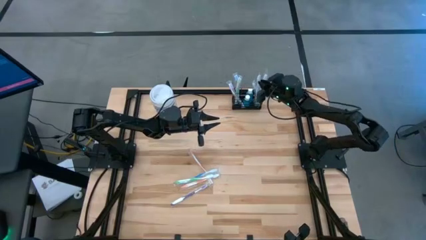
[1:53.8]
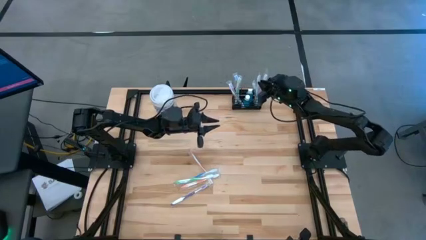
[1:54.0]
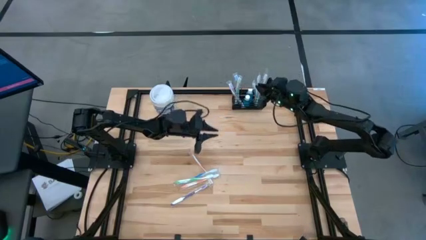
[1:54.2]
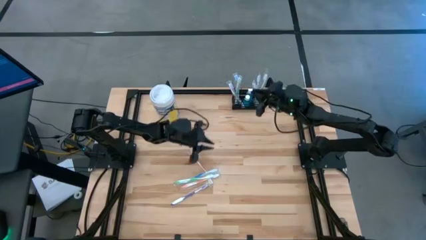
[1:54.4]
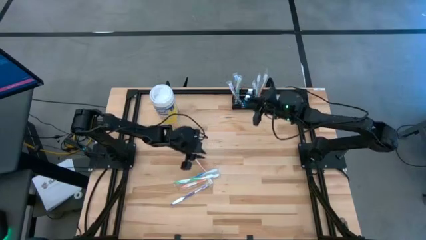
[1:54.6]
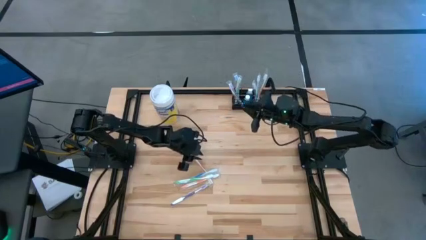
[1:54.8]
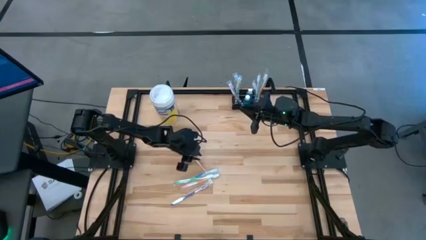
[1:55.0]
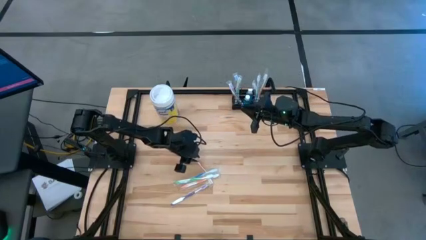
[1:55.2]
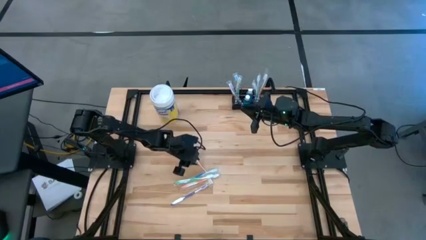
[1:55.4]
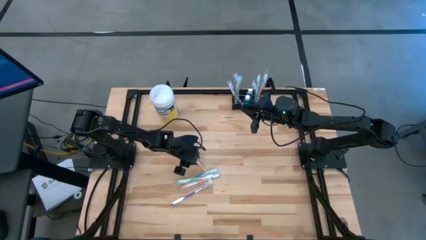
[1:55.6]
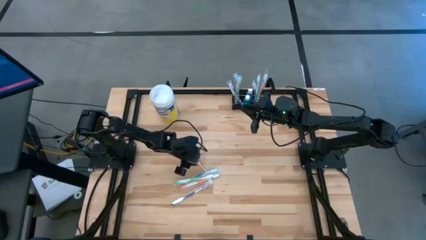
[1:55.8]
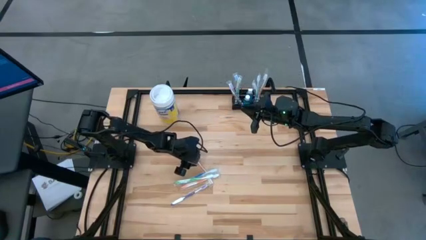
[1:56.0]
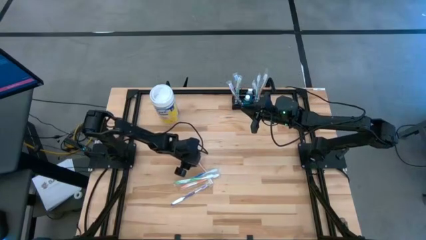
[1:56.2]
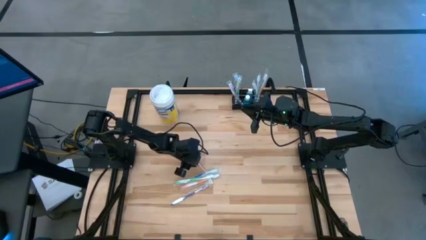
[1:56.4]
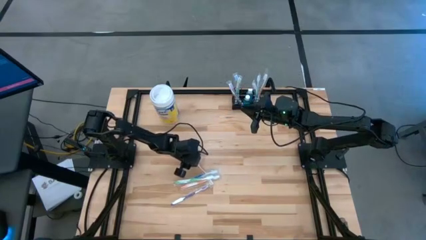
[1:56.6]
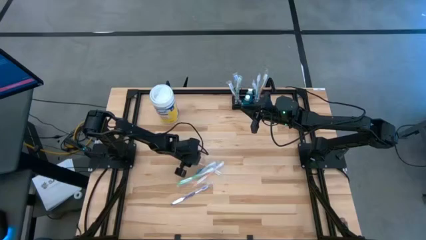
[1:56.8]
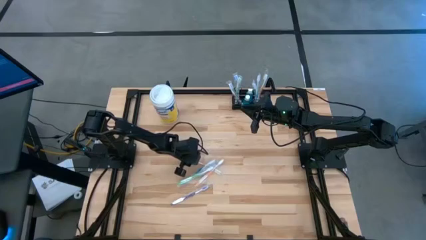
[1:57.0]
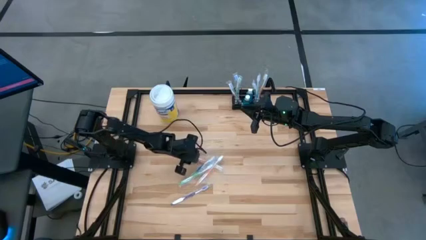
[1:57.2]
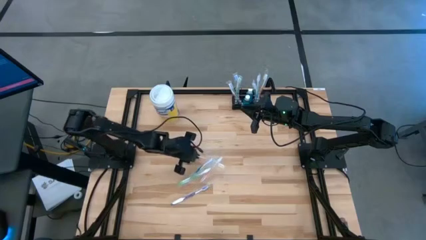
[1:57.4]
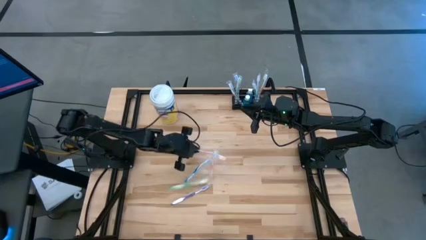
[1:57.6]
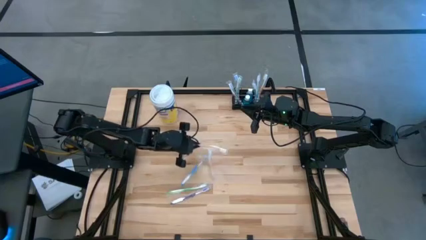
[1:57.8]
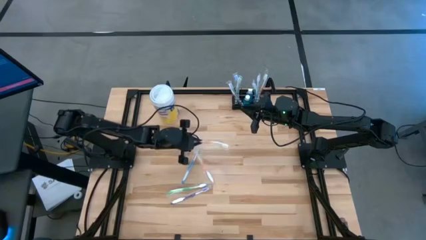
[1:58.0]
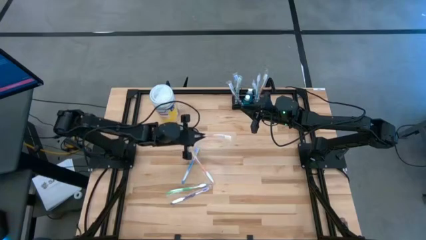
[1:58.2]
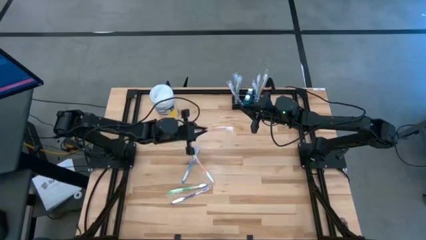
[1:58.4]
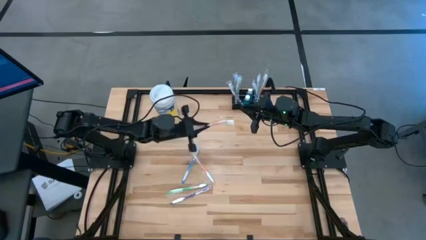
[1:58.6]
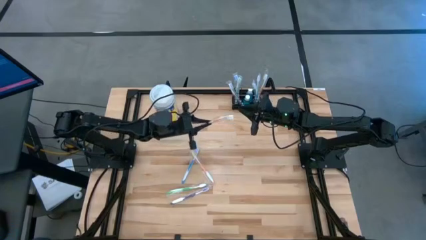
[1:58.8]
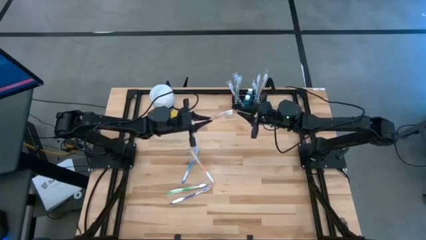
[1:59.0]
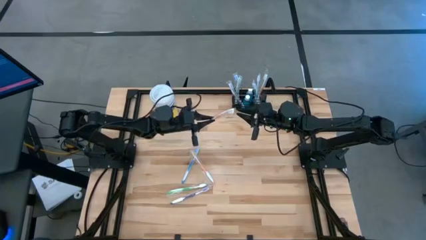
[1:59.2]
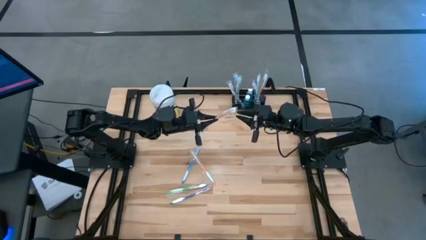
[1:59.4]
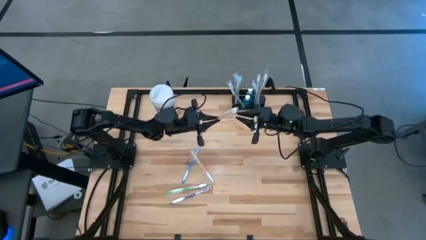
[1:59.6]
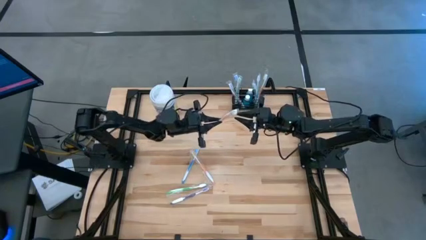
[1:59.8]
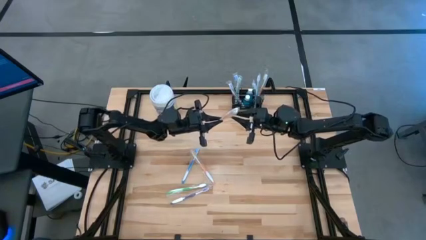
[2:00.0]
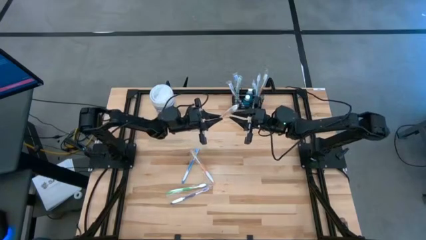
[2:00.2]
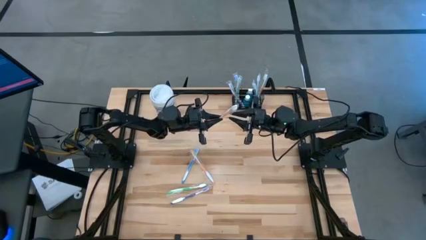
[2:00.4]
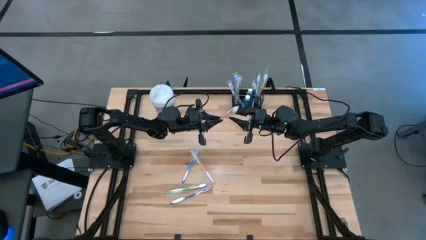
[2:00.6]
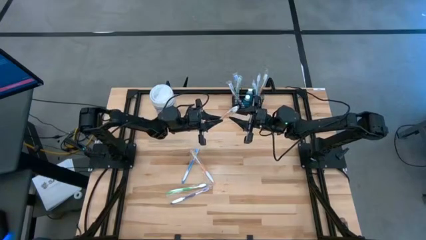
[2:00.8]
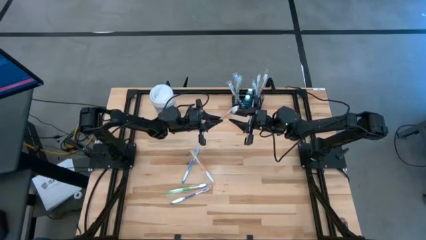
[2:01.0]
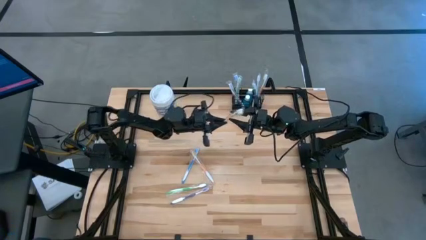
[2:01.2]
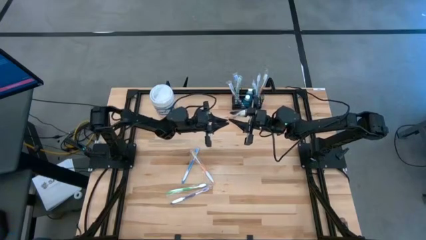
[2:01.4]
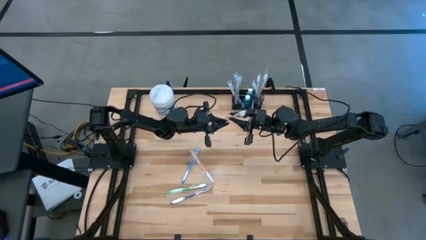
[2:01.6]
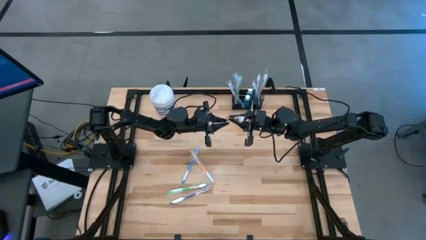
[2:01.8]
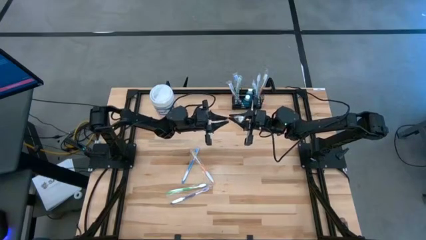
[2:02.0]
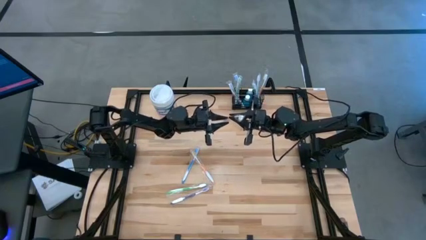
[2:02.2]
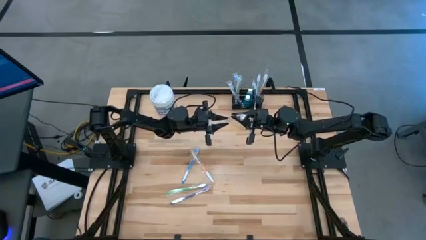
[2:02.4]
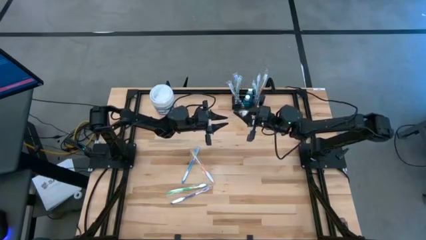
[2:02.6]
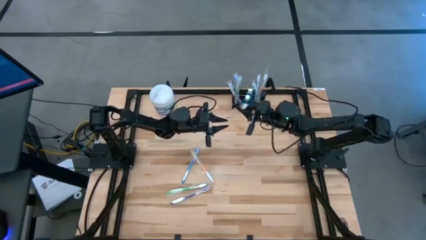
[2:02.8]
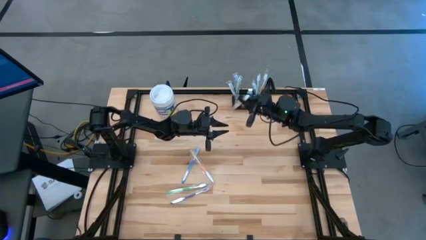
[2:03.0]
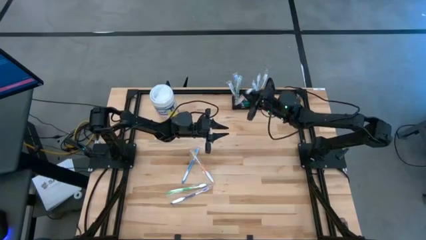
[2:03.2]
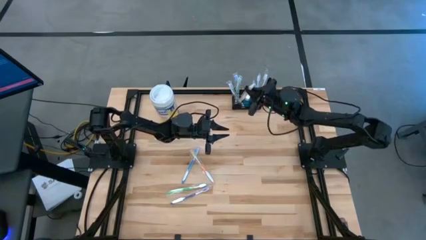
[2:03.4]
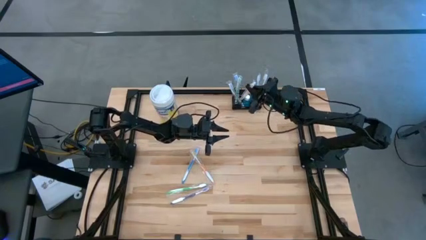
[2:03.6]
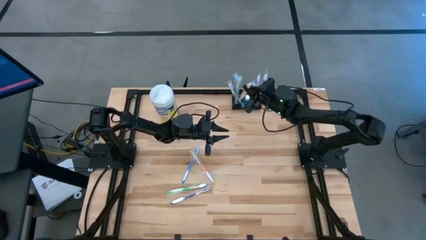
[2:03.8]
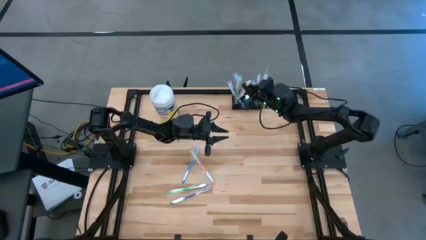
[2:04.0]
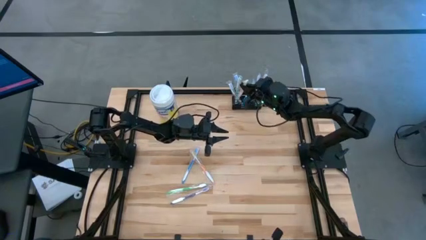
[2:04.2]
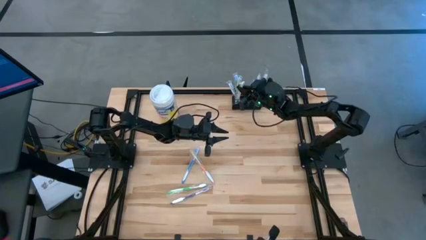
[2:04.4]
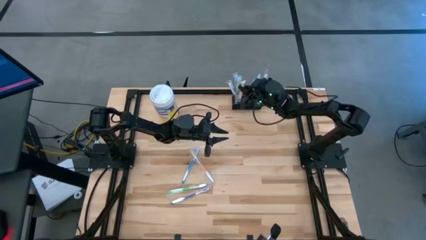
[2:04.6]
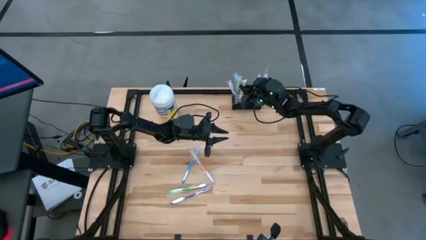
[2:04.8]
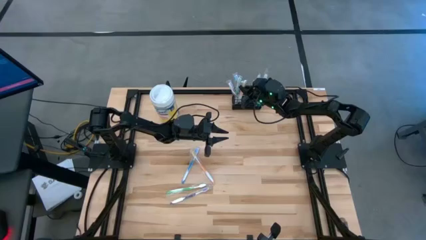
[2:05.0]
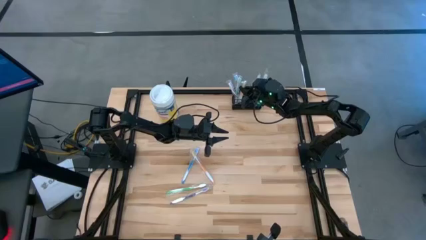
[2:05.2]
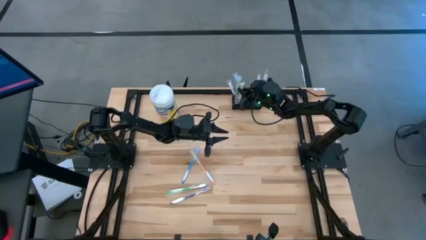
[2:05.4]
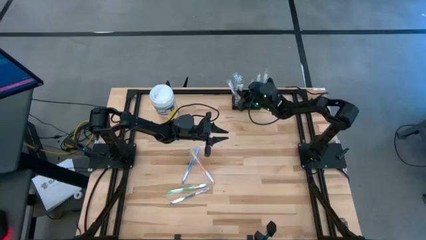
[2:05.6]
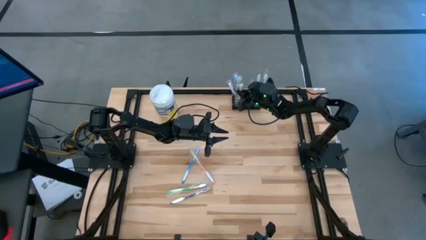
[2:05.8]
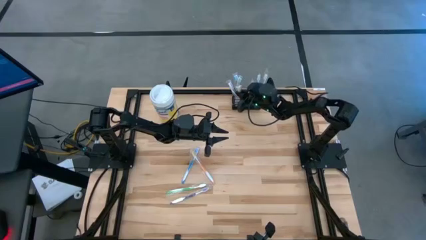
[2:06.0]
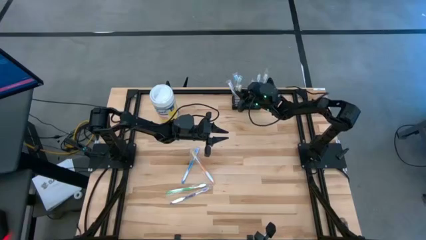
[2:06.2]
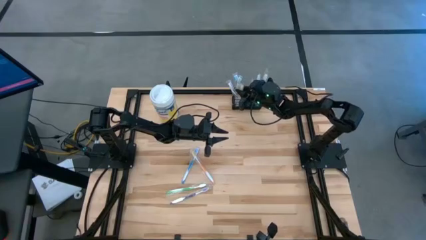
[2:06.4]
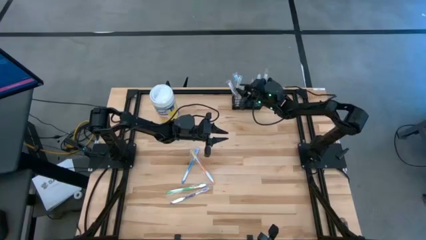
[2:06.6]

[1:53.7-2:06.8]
Task: Pick & Place toothbrushing station
Put the orange toothbrush into the black mesh organizer

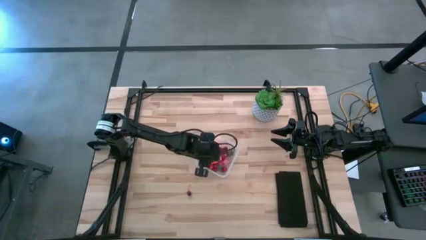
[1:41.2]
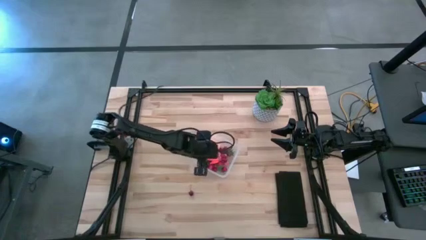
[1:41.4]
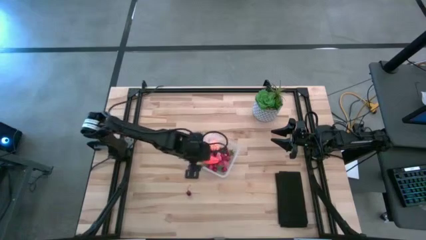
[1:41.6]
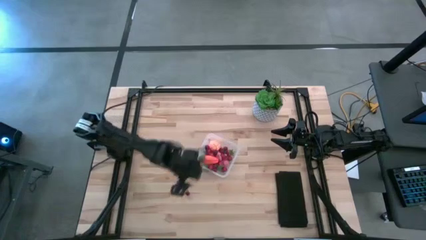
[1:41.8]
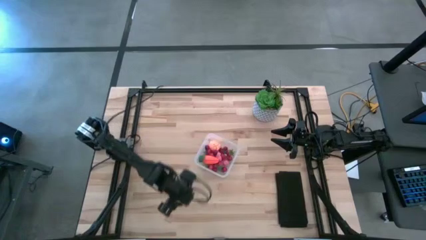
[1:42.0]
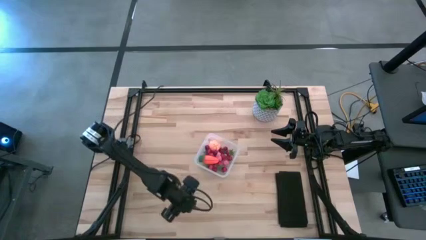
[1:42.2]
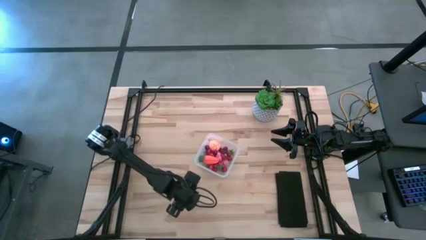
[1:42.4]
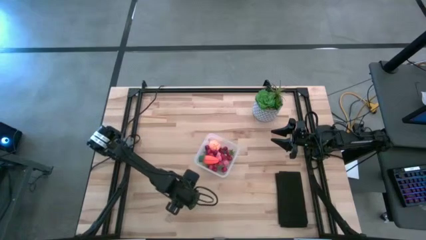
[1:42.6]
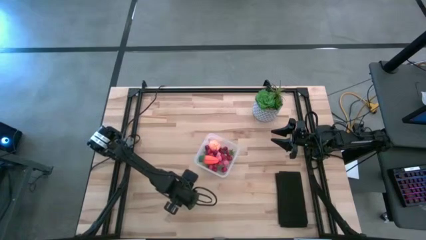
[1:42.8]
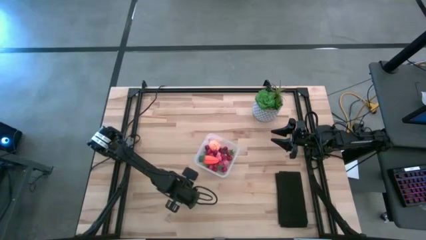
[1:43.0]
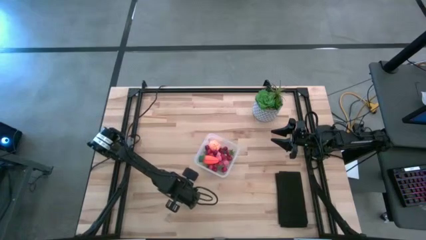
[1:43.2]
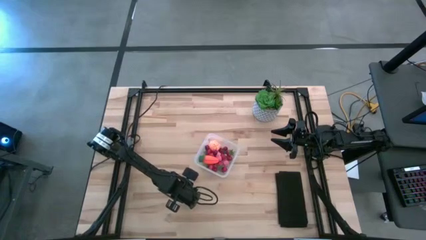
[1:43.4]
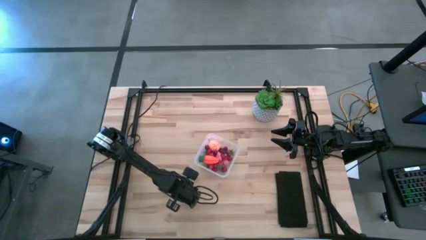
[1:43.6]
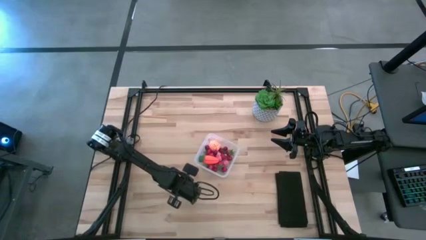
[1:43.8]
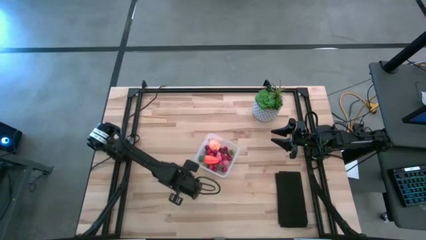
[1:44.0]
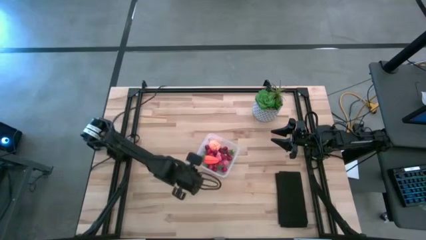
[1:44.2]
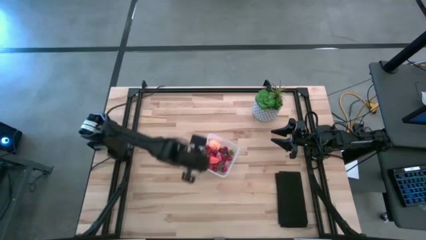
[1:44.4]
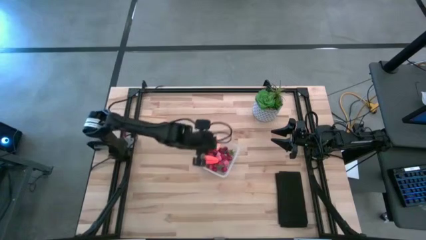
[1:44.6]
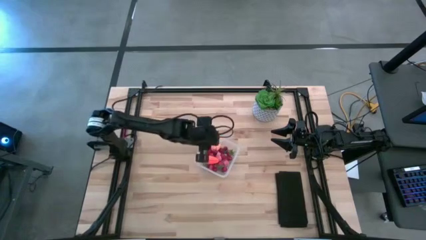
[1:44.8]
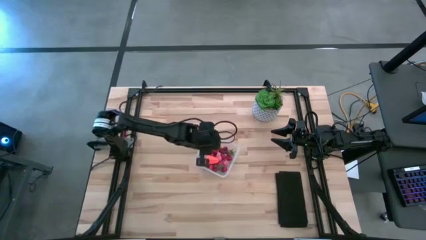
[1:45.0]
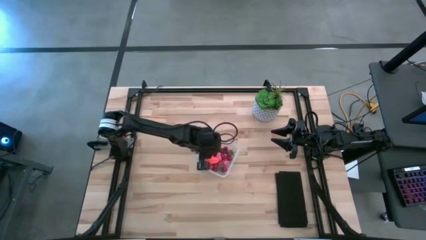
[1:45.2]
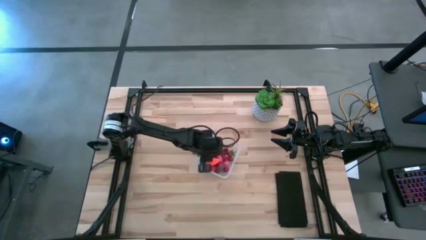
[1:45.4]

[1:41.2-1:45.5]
Task: Pick and placing Produce into tupperware
Put the red cherry into the transparent container
